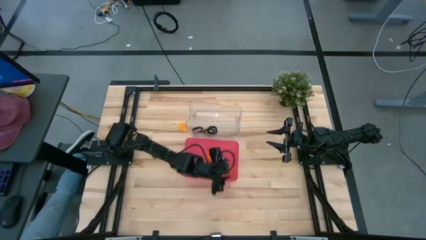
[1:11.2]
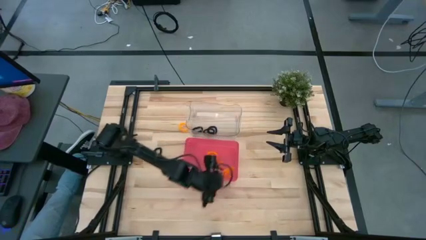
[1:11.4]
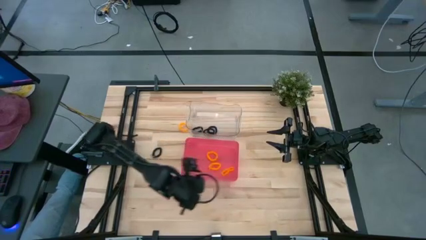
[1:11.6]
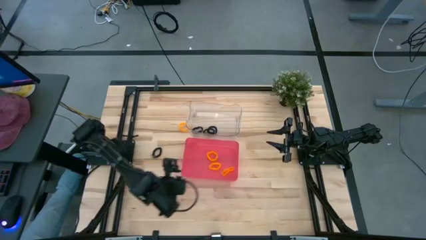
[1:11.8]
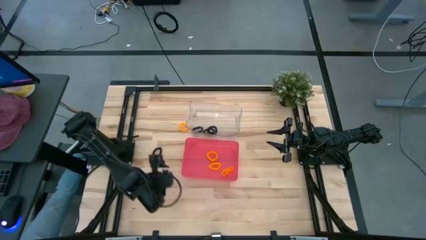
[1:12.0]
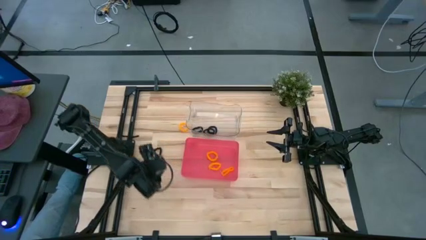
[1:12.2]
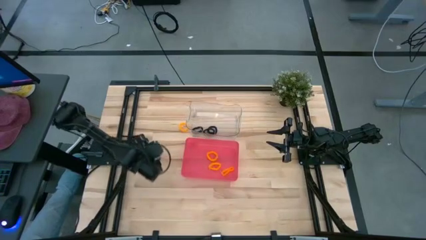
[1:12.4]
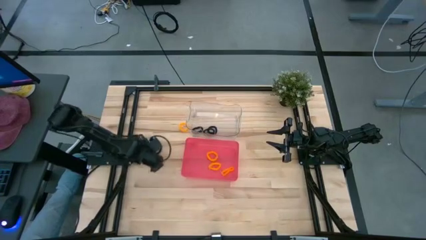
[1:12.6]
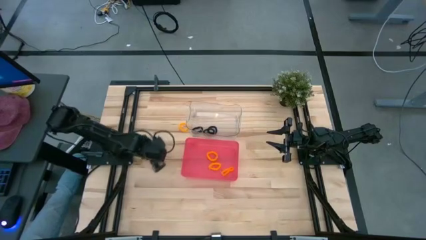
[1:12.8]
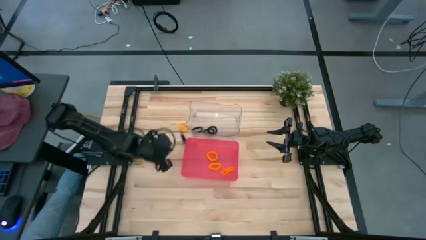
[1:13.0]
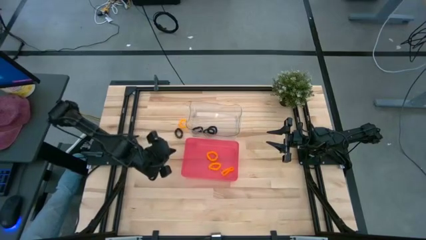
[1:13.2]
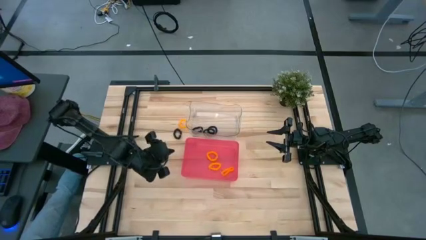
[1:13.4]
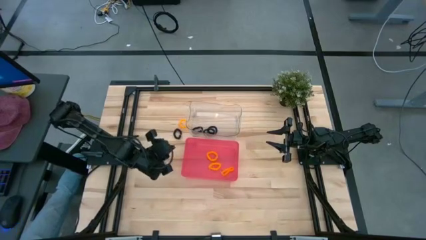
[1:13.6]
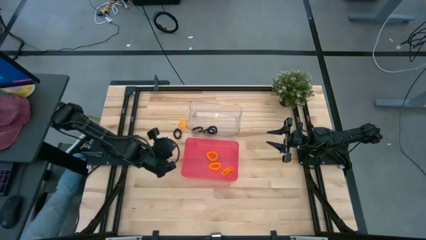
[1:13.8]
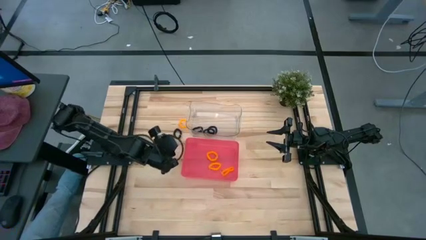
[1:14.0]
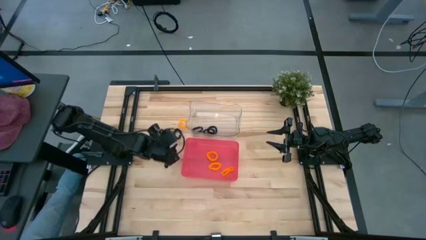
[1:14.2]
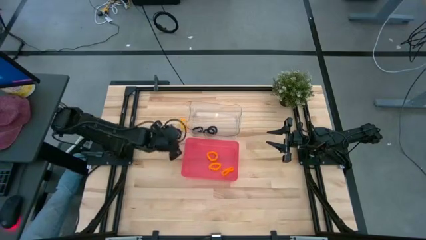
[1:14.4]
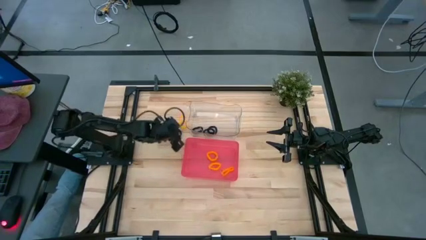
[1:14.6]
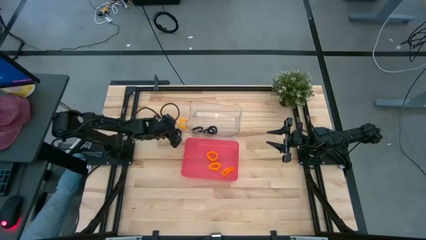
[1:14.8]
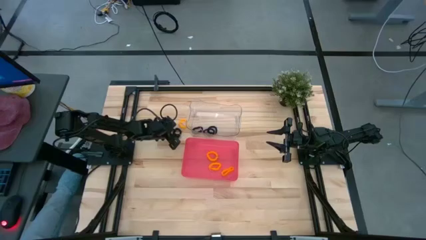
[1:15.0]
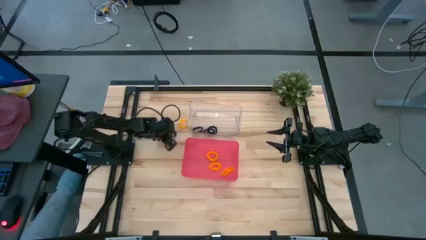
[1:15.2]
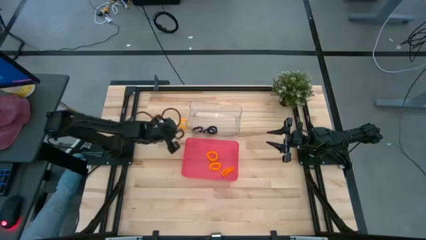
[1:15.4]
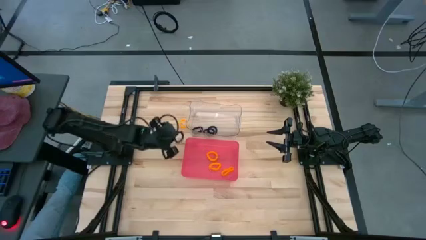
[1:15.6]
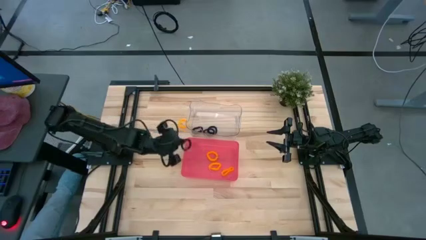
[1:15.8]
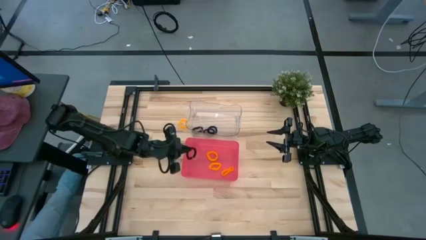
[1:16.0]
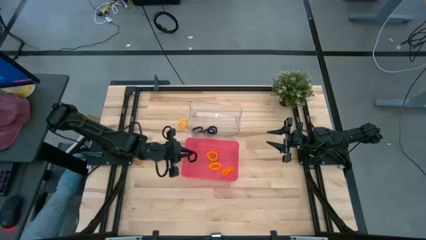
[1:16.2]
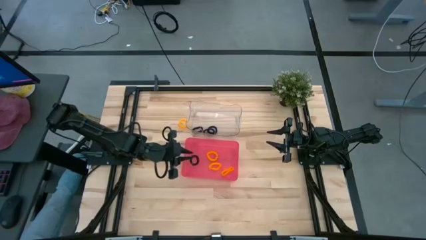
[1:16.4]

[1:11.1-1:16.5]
Task: Sort spring keychains
Put the black spring keychain into the transparent bin

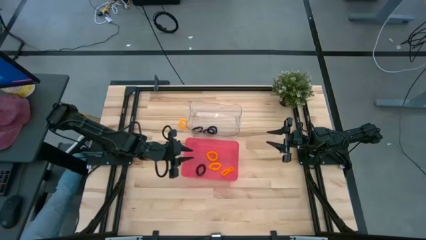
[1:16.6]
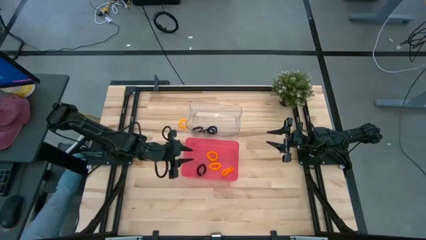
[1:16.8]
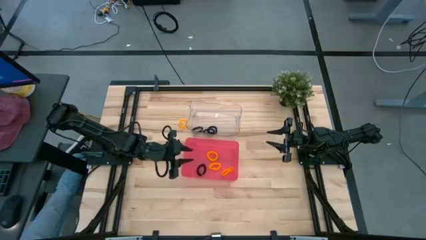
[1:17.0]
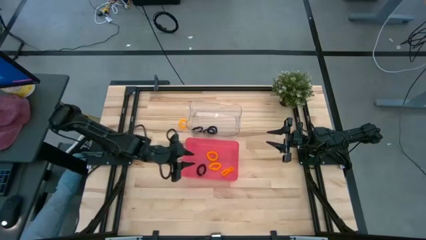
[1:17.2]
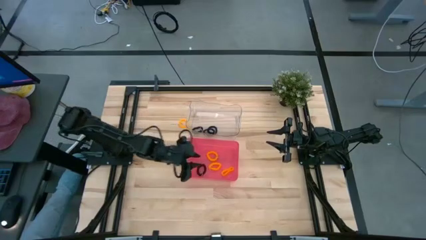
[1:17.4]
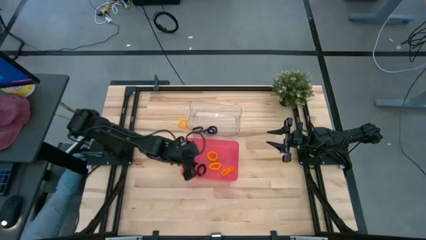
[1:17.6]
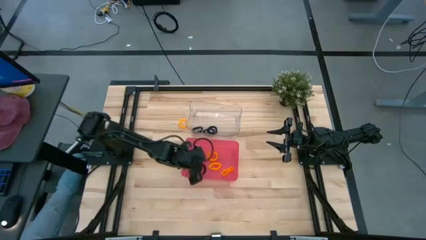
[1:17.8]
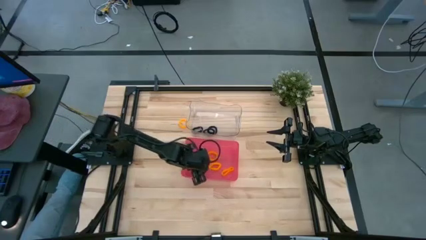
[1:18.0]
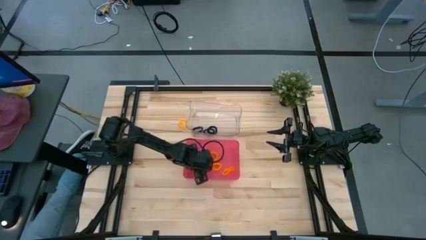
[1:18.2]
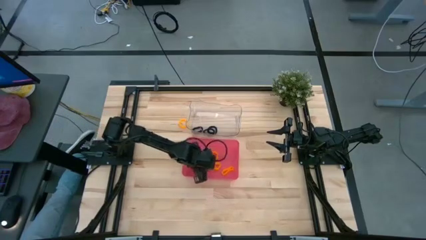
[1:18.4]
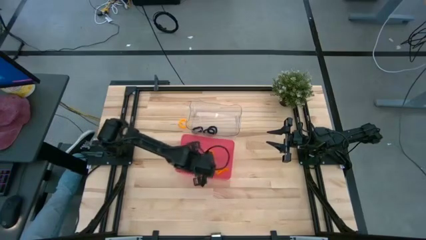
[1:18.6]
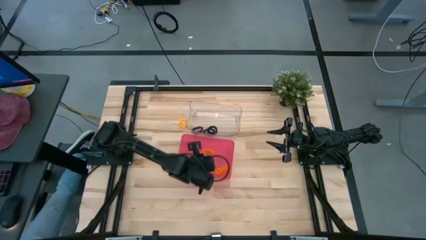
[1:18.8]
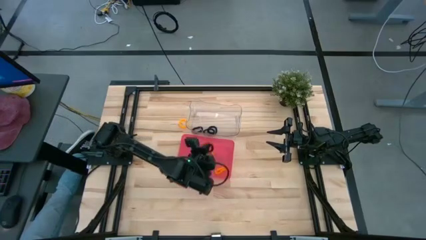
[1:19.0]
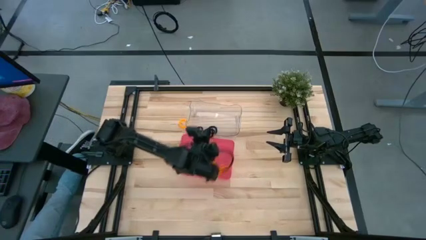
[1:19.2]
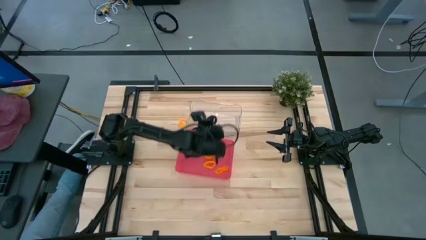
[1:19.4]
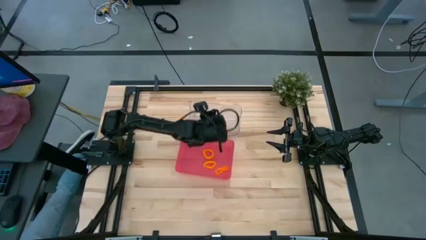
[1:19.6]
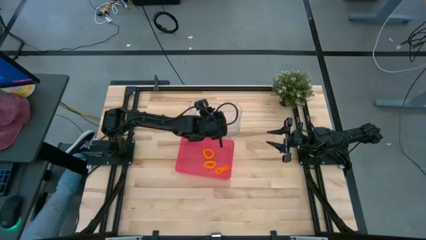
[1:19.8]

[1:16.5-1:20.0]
Put the black spring keychain into the transparent bin

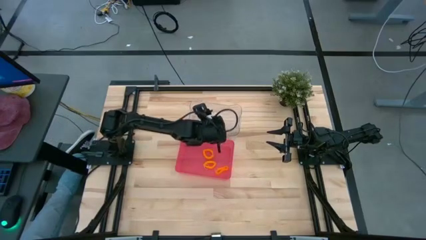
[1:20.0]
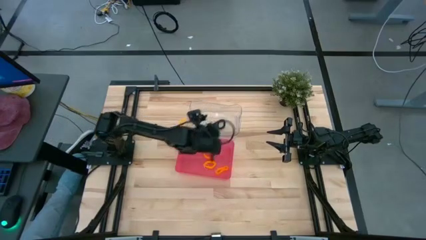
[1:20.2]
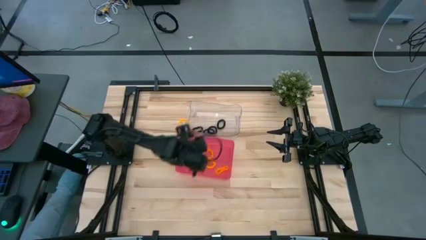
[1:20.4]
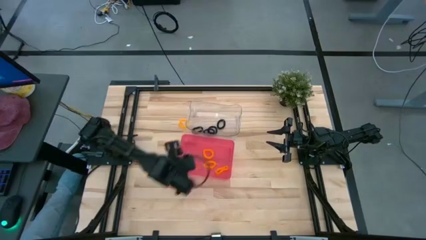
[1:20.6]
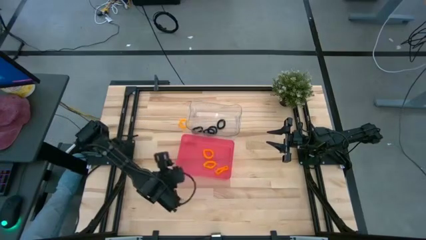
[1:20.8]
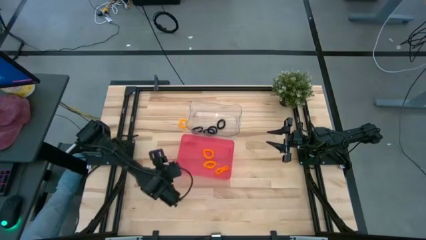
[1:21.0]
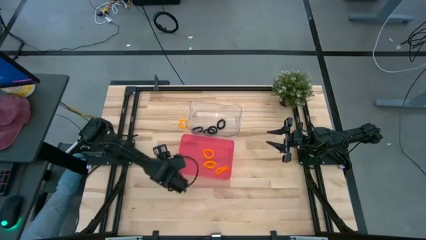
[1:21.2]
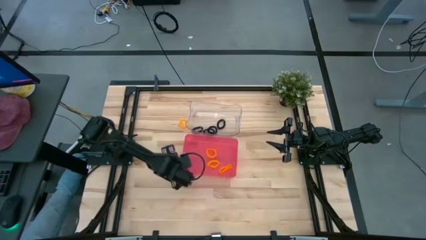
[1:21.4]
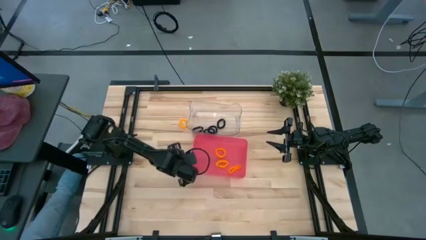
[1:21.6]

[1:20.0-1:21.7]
Adjust the red bin on the table

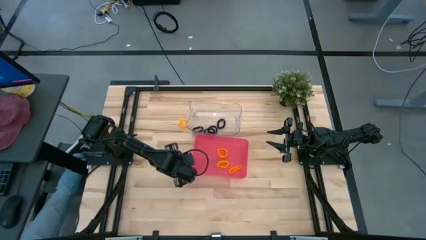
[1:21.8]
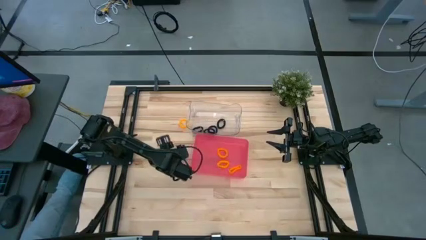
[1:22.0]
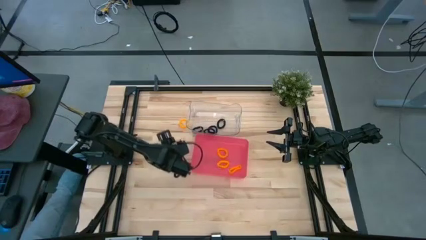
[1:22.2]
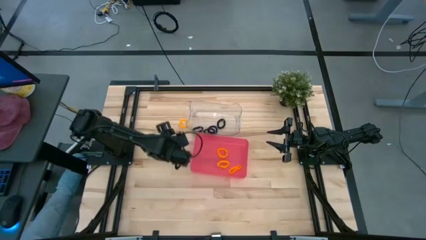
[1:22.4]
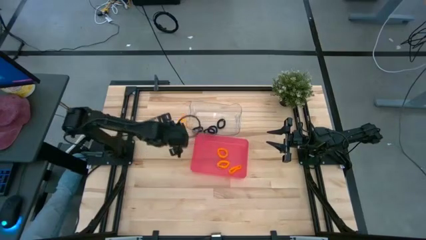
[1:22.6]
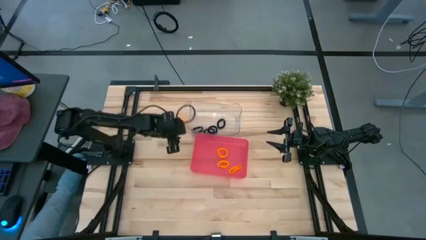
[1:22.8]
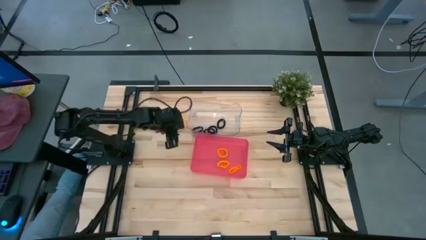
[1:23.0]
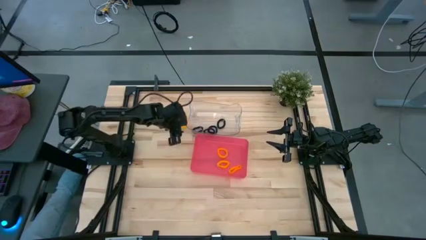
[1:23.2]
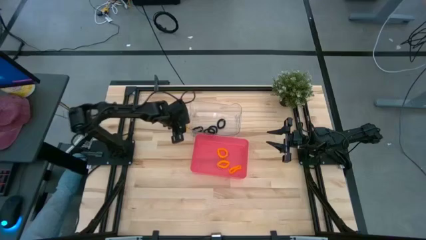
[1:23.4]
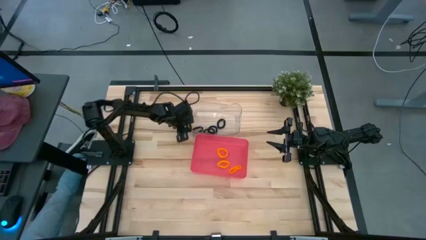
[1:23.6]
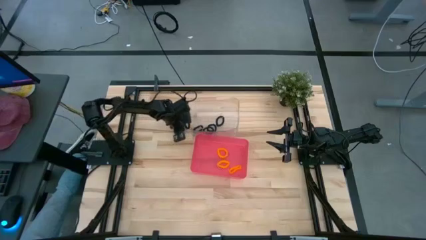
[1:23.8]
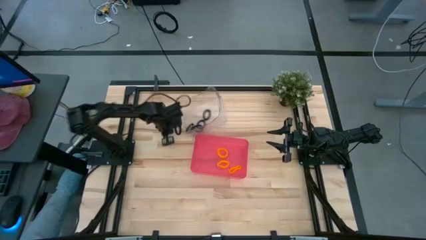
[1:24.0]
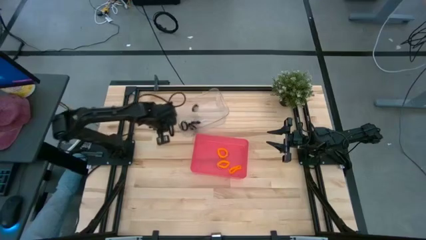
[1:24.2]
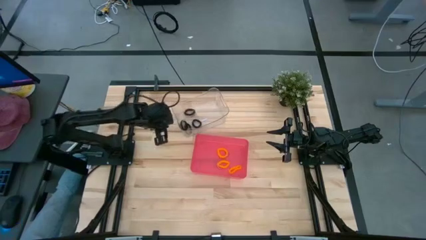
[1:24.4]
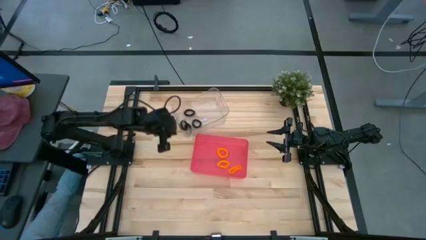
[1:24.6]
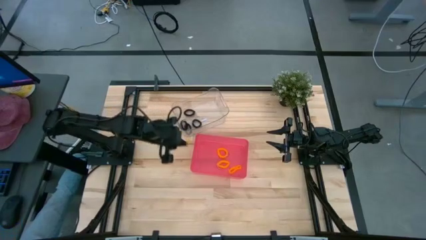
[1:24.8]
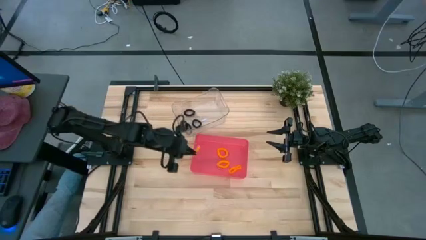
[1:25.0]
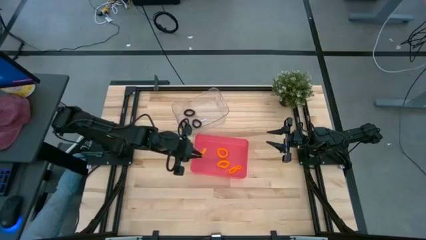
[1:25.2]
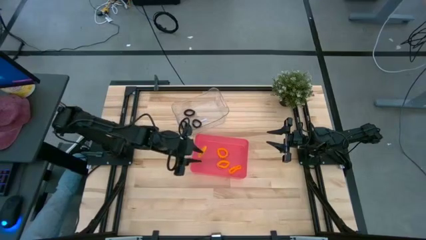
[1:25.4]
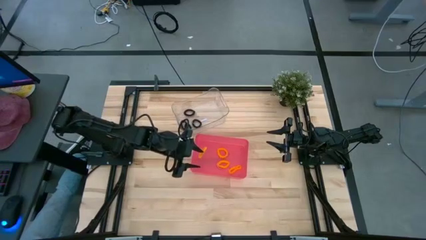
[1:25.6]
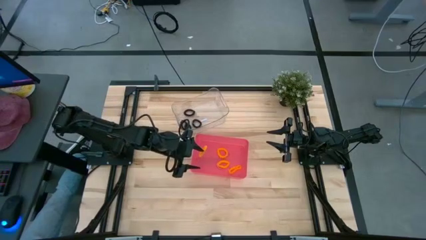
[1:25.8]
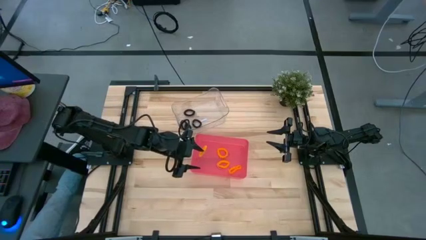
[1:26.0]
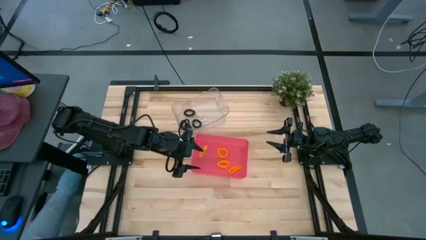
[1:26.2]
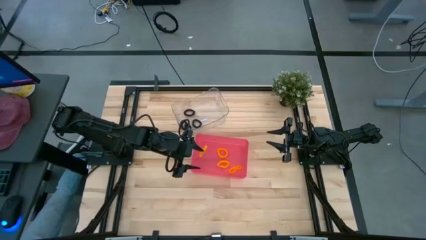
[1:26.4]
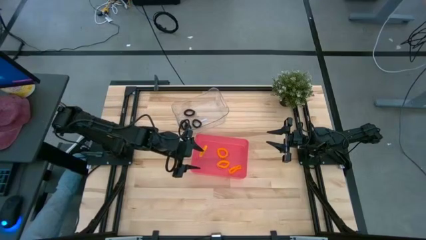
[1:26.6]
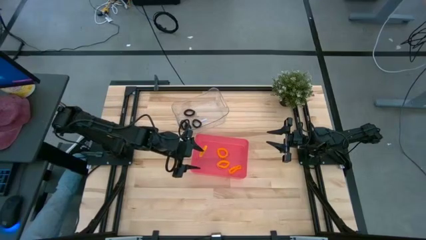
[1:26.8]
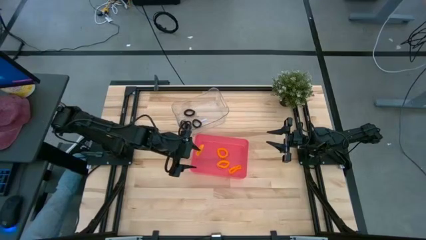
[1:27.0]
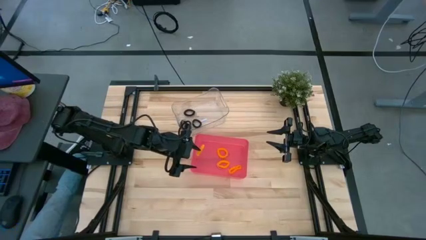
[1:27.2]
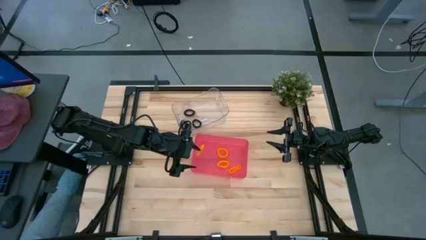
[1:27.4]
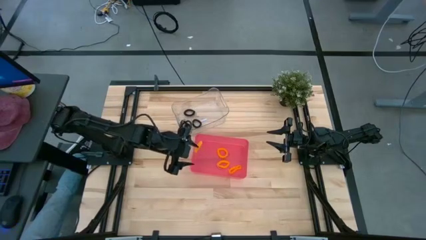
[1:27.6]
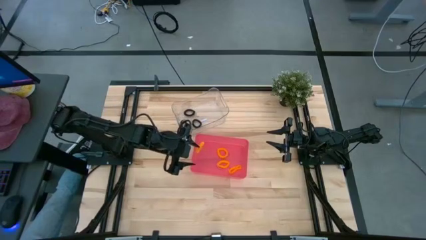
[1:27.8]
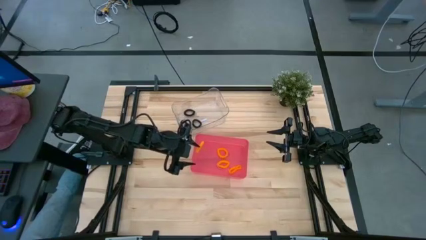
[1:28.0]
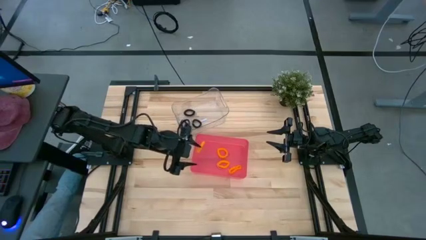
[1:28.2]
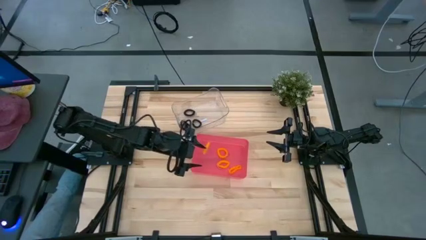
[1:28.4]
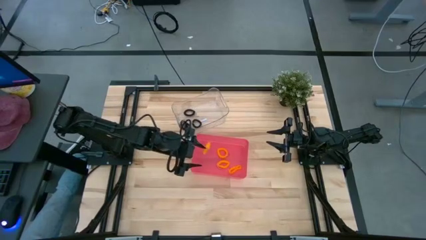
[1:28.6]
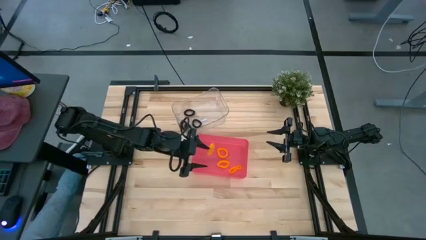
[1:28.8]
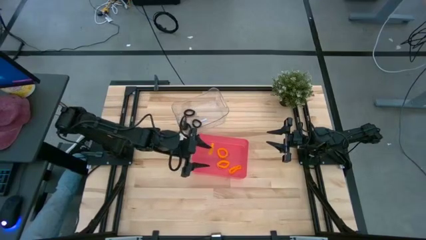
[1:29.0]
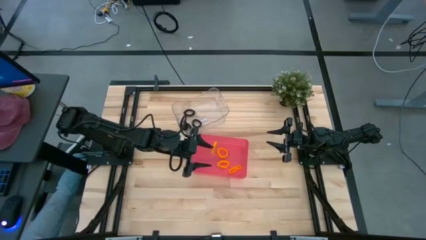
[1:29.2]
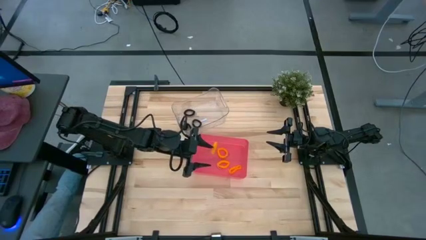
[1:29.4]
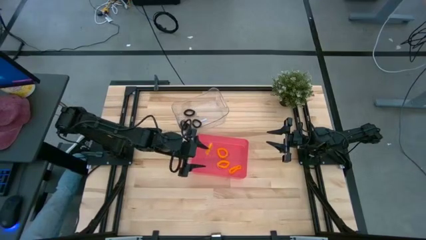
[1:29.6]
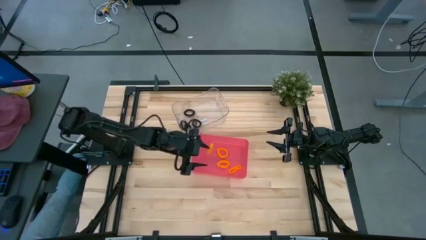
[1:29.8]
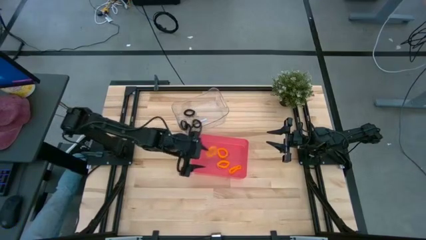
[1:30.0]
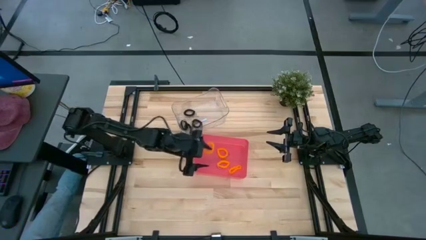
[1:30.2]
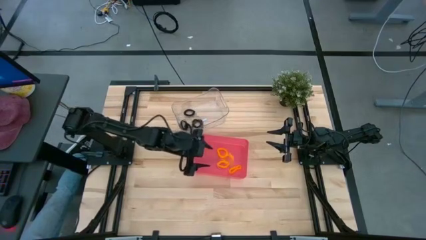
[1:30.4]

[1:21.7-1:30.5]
Put the yellow spring keychain into the red bin
